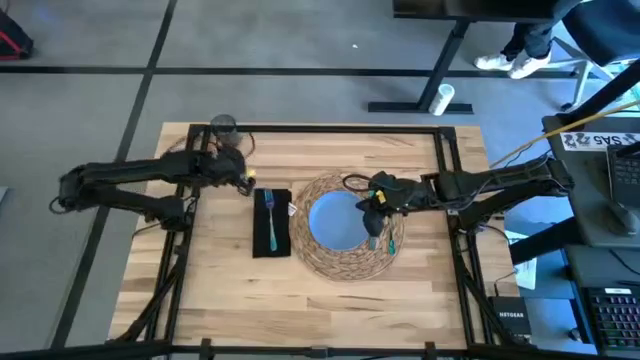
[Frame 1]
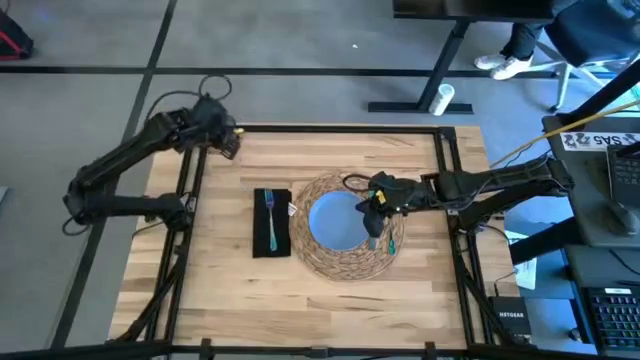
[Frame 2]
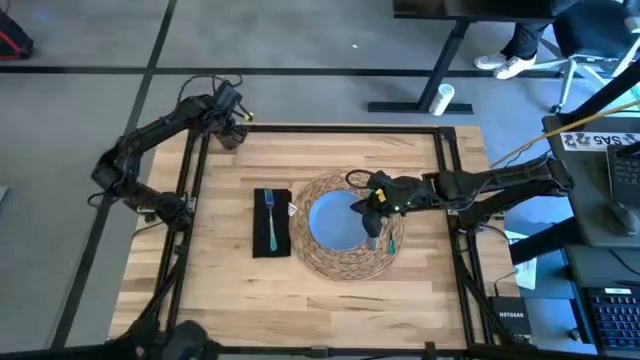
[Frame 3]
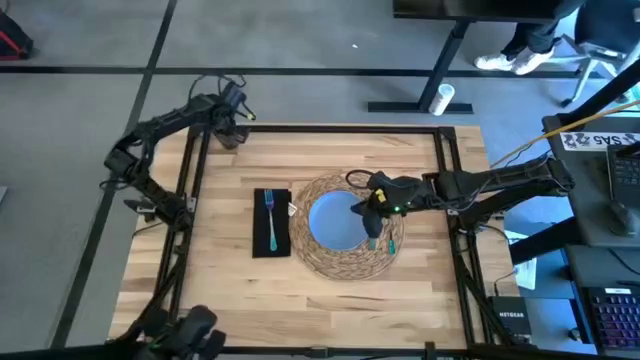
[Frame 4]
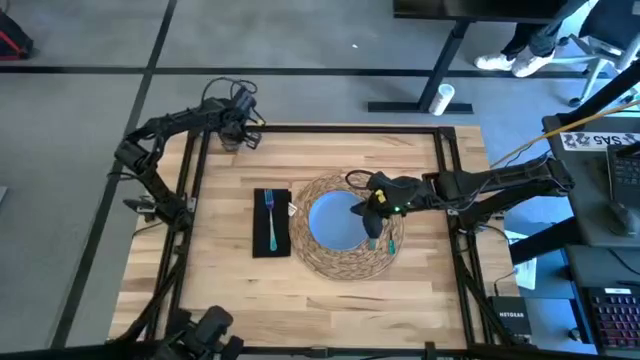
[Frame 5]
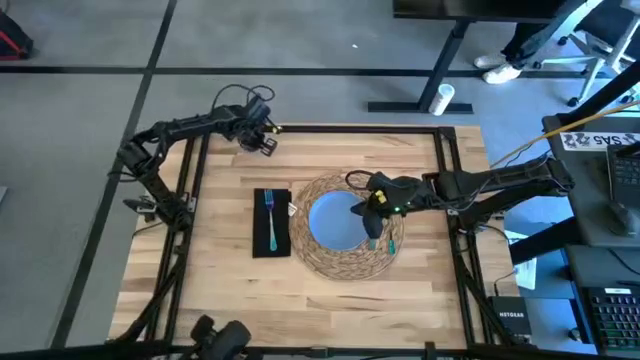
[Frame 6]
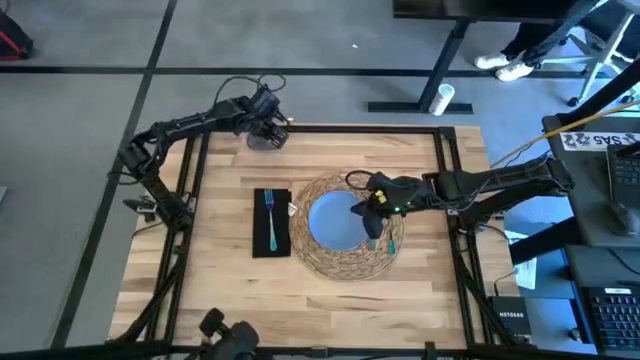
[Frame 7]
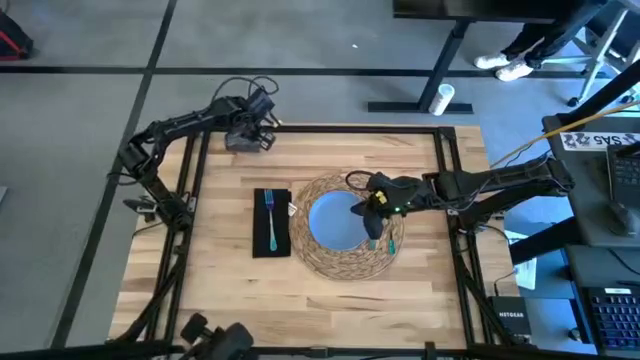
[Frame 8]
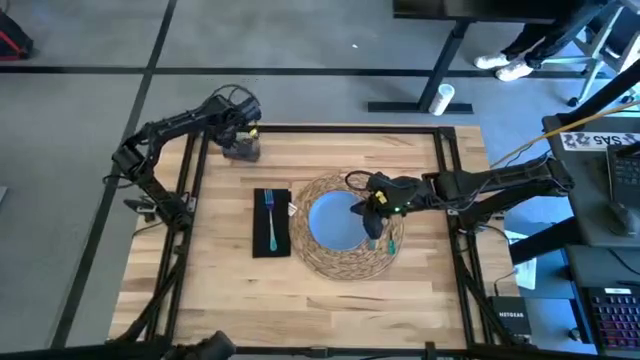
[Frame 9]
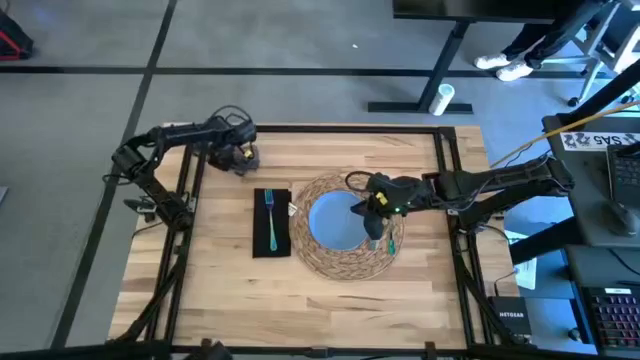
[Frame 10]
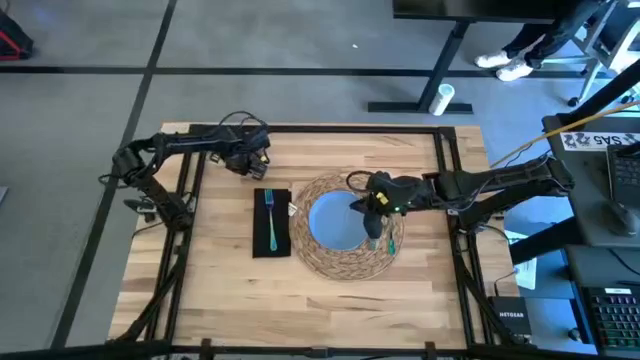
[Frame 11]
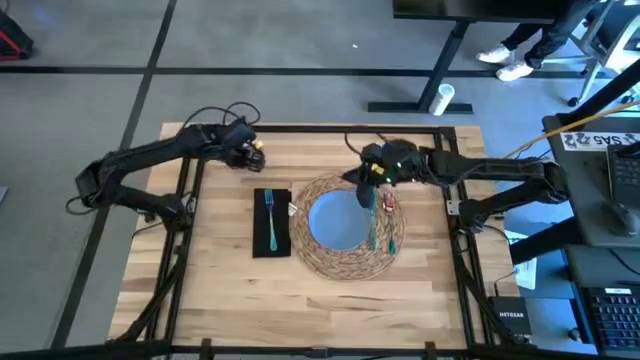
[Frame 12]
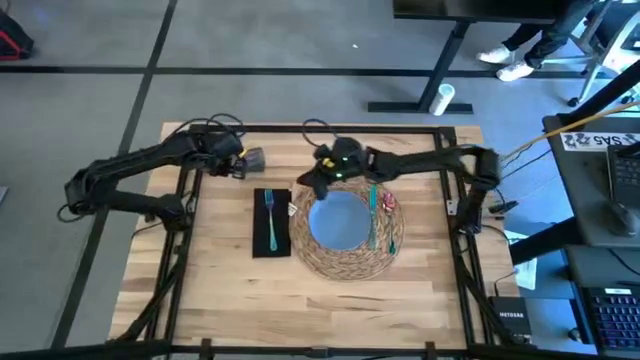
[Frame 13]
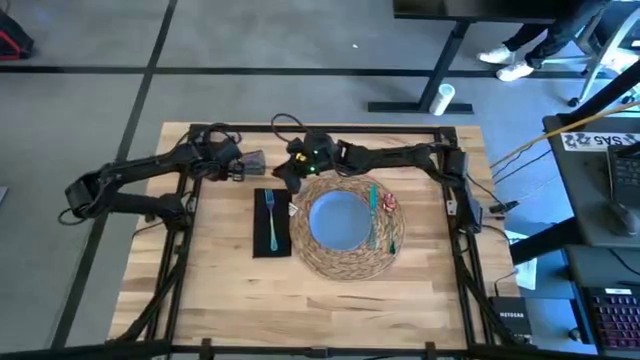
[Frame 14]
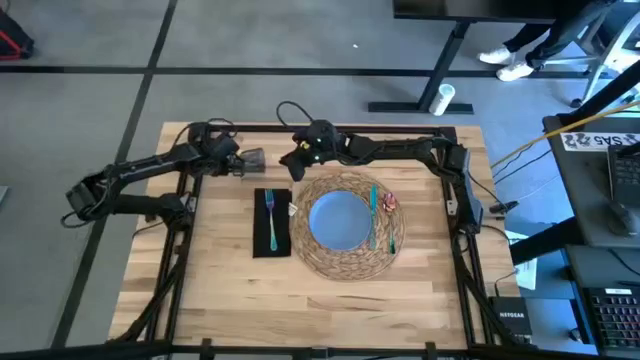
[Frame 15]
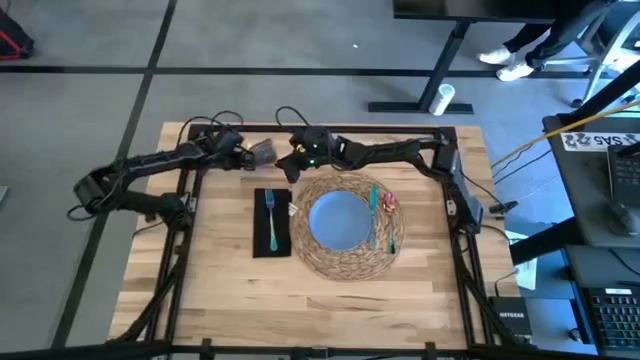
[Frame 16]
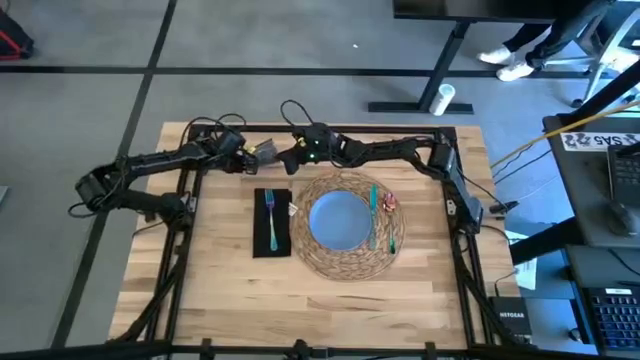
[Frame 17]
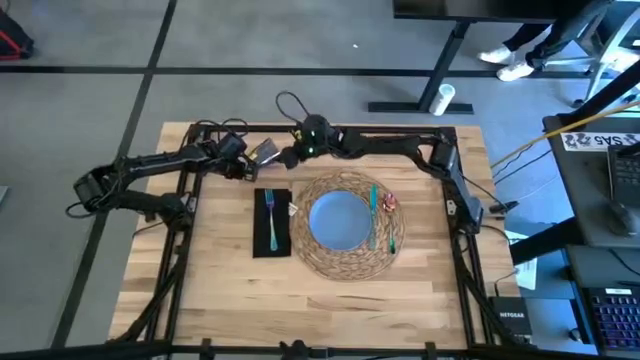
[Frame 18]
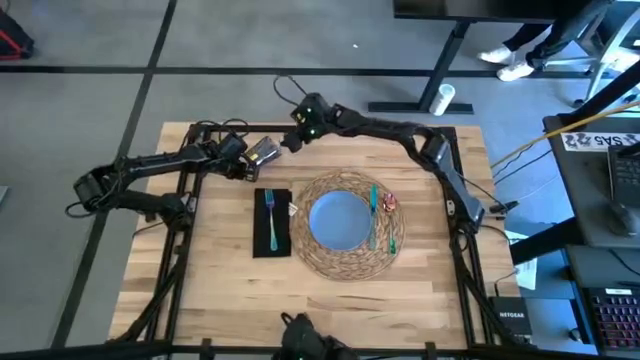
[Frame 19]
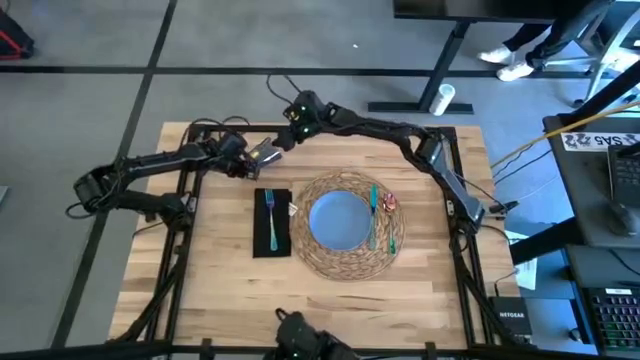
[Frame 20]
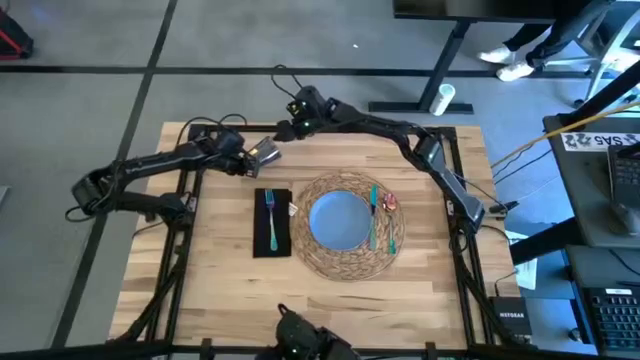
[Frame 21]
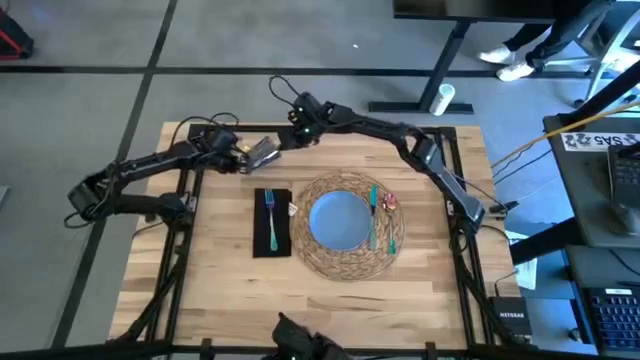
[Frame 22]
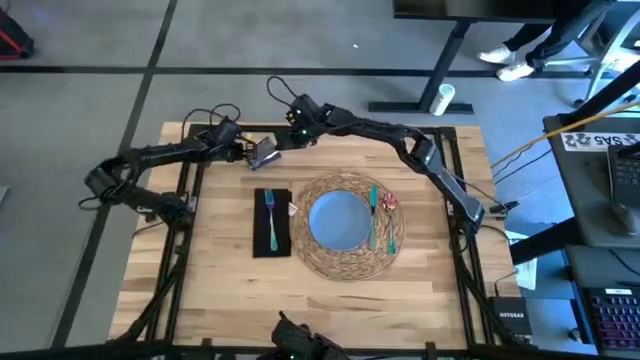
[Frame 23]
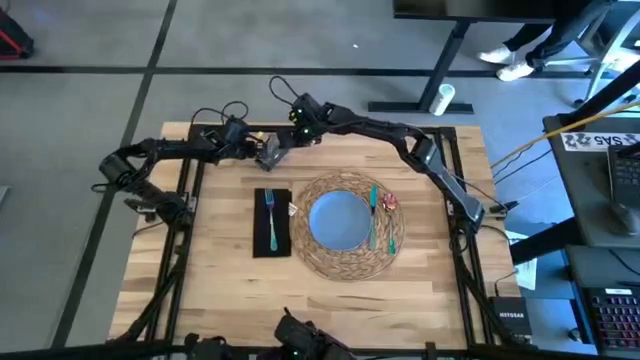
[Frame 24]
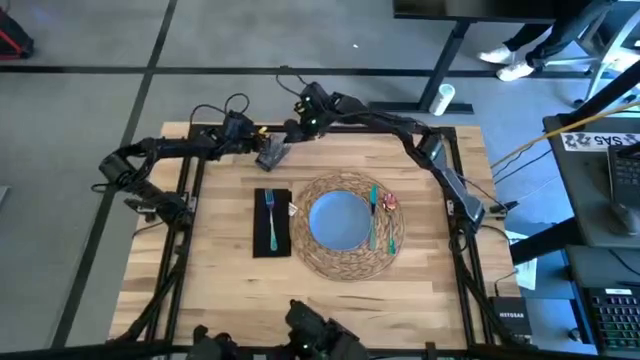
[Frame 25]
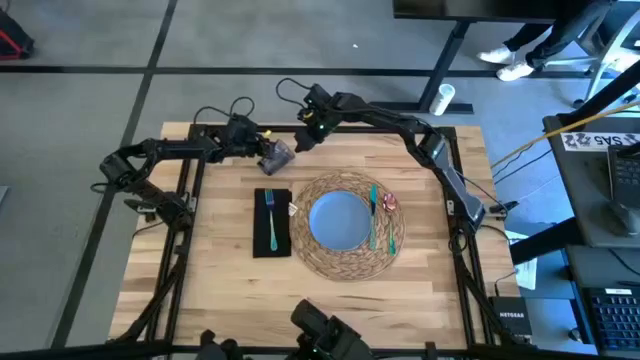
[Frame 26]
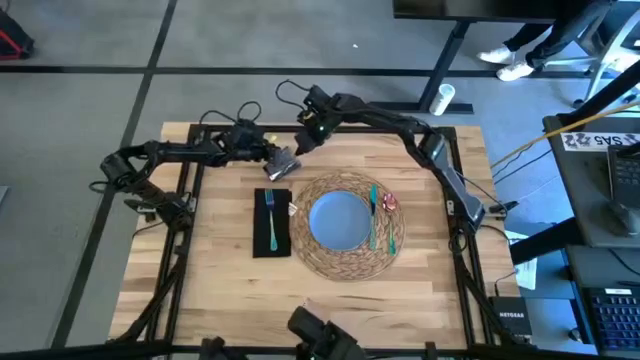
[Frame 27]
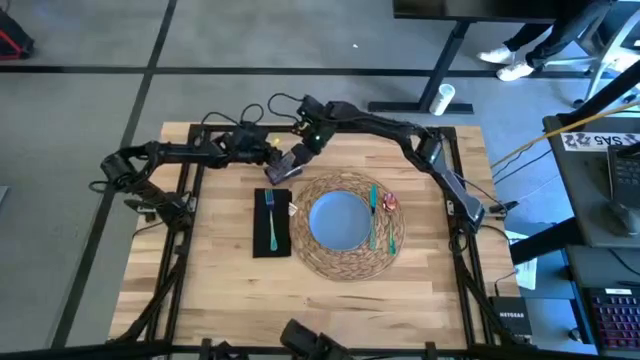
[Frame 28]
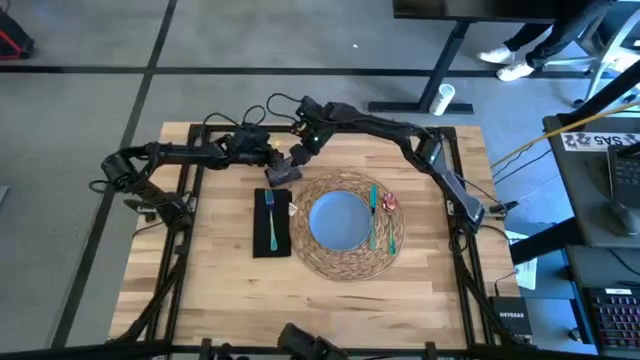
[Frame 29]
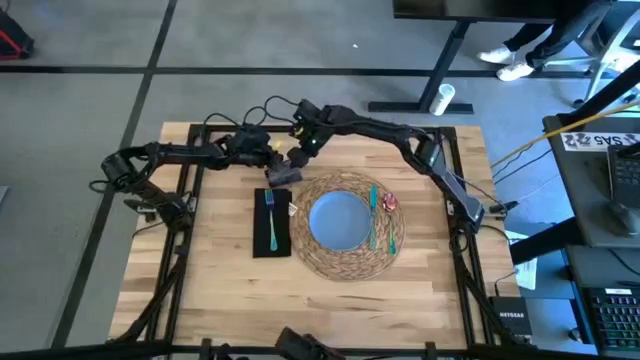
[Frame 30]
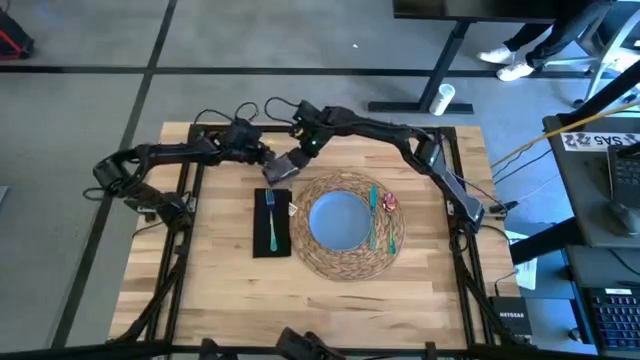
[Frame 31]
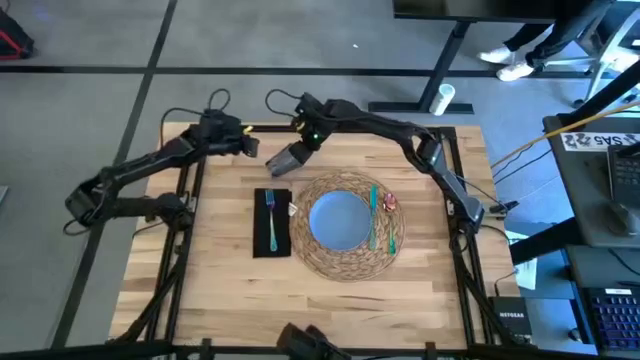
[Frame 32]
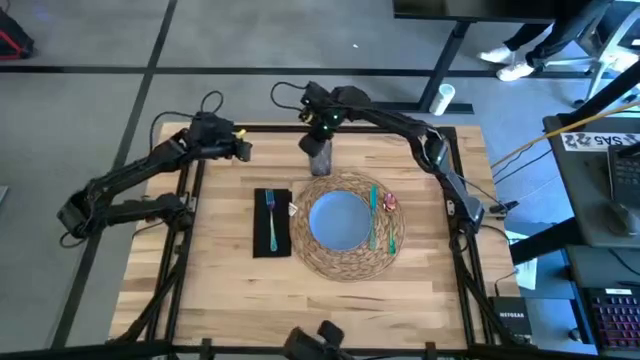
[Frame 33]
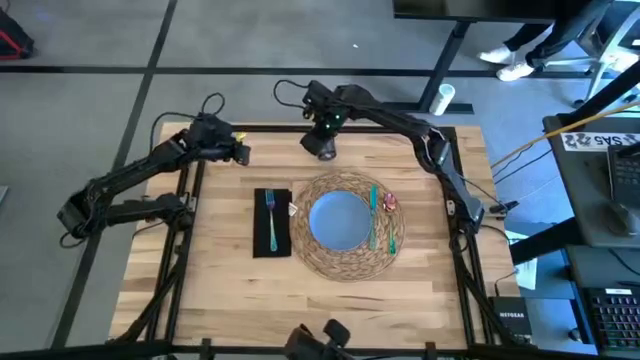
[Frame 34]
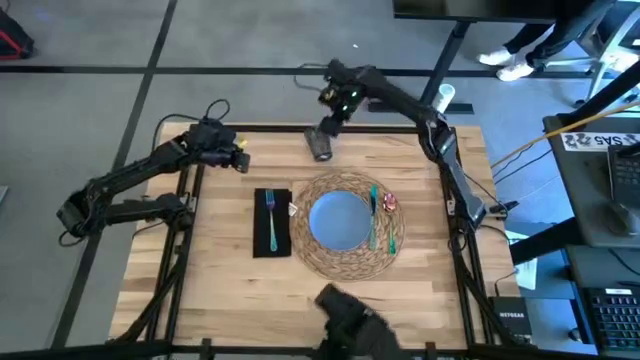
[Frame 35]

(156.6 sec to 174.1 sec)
Task: Set table place
Put the blue glass cup above the brown placemat

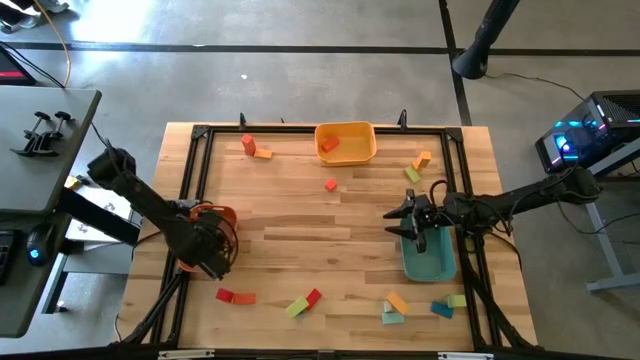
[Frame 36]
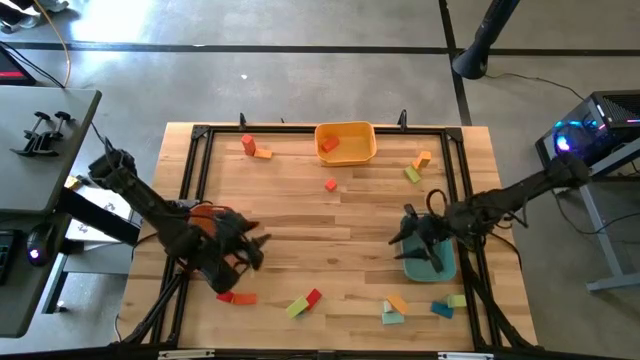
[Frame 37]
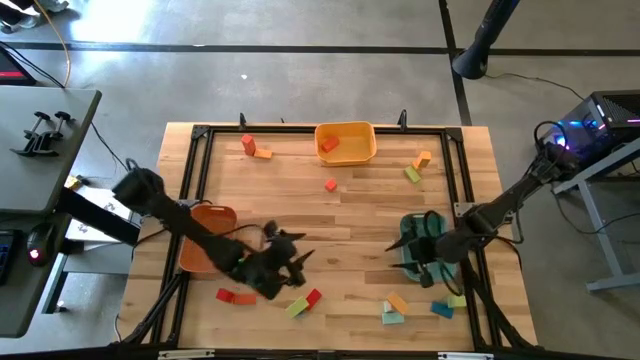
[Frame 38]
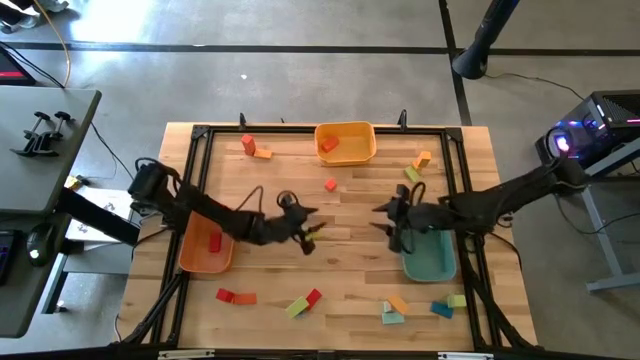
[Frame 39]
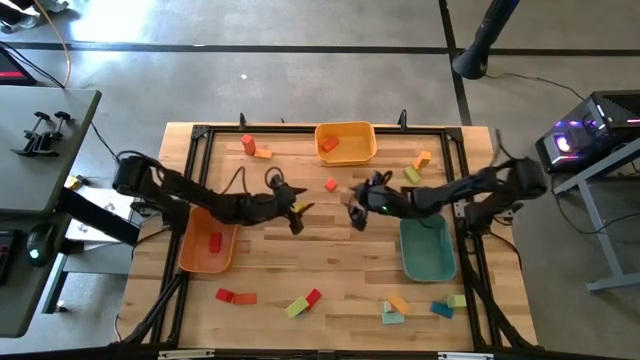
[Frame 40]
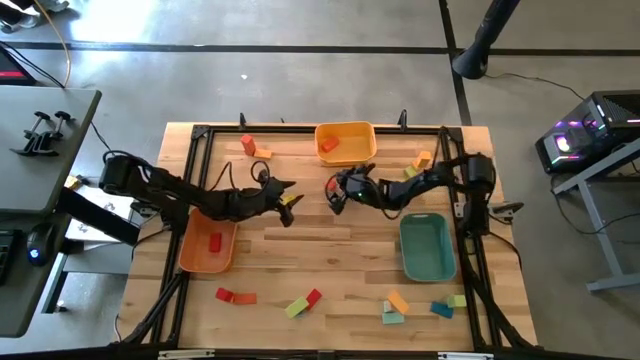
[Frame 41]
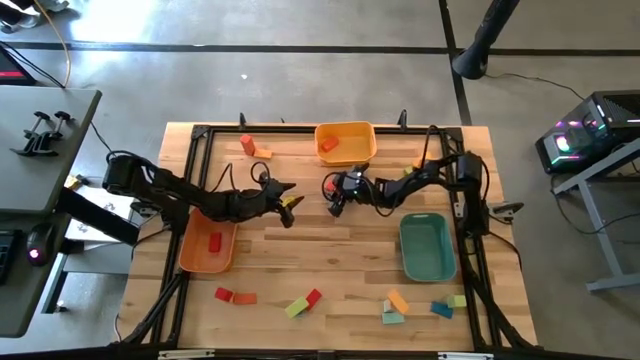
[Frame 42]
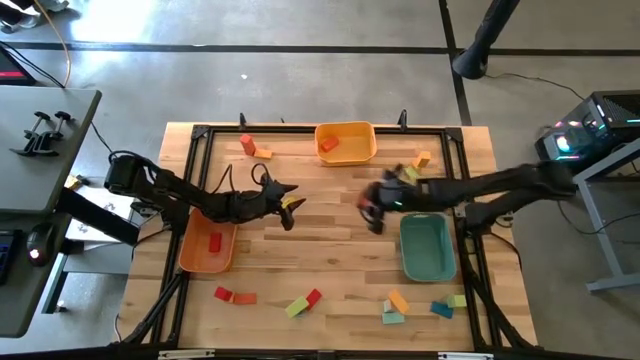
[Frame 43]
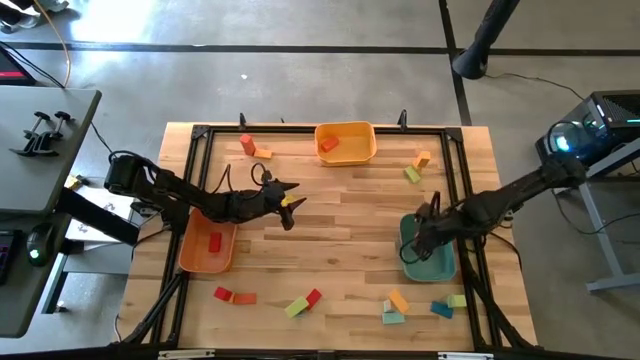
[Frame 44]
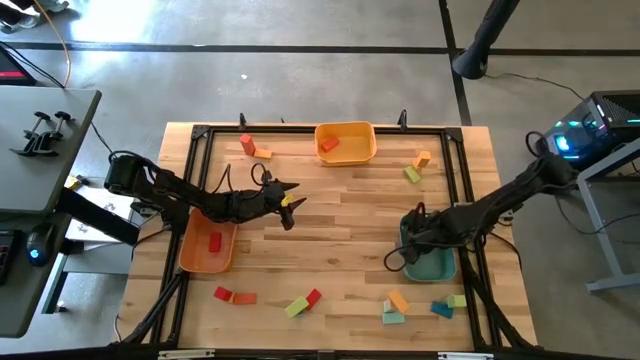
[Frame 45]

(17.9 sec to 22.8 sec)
Task: Sort blocks by size
Put the orange small block into the green bin
